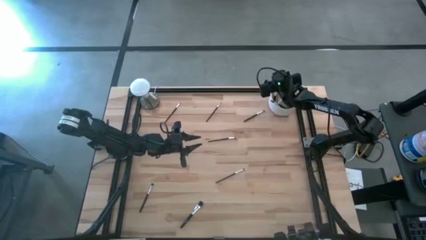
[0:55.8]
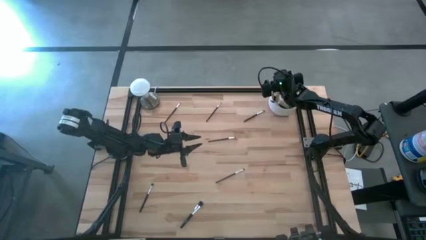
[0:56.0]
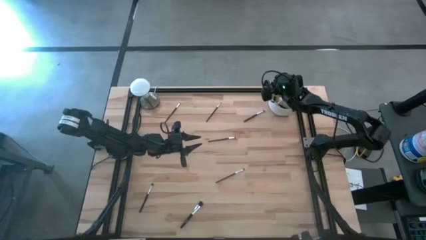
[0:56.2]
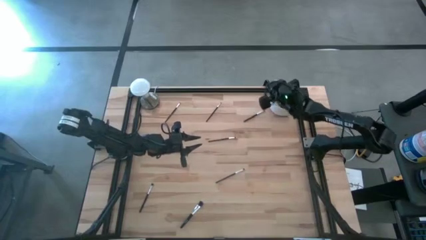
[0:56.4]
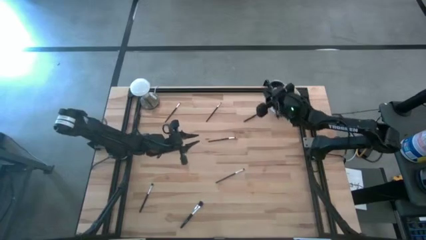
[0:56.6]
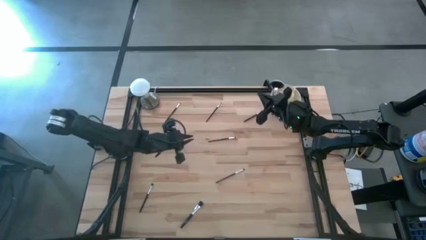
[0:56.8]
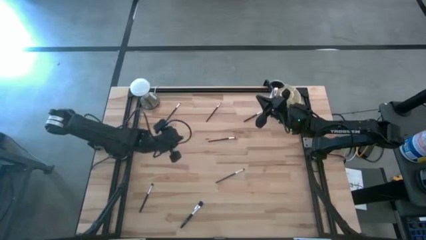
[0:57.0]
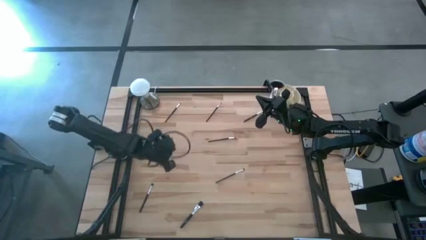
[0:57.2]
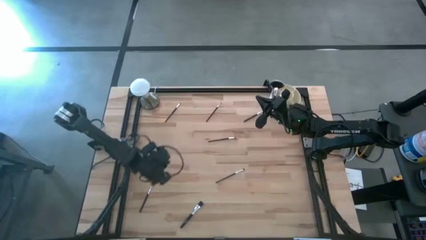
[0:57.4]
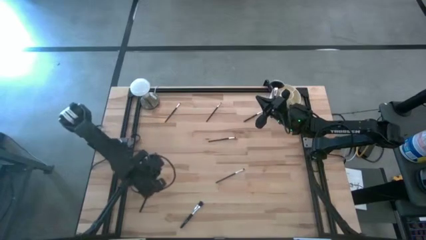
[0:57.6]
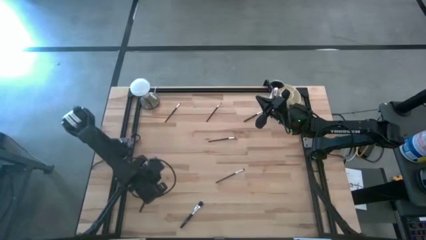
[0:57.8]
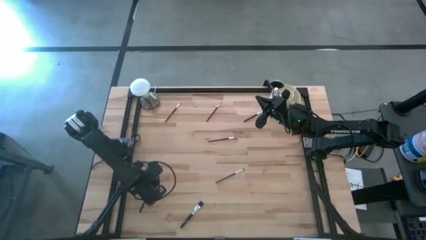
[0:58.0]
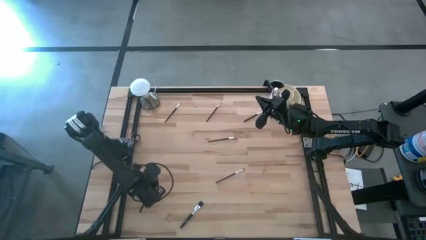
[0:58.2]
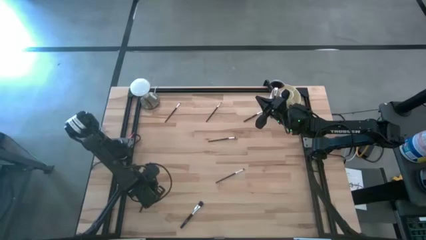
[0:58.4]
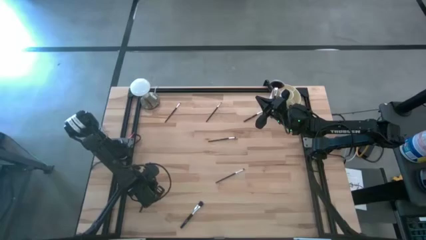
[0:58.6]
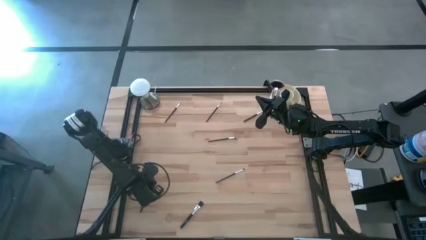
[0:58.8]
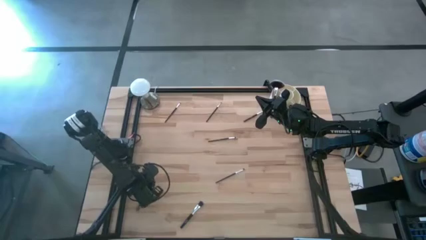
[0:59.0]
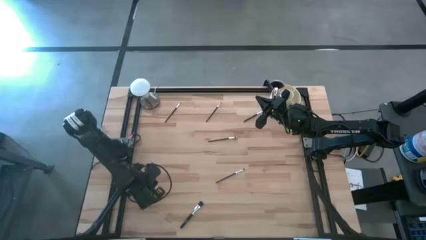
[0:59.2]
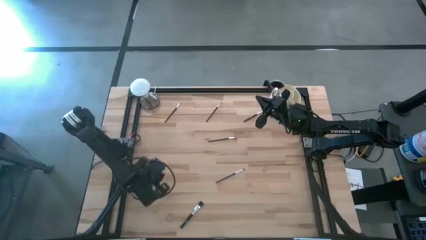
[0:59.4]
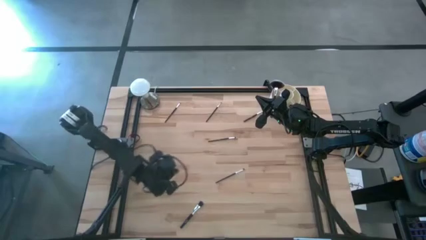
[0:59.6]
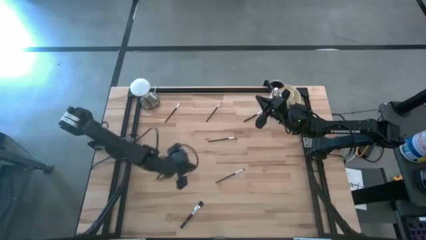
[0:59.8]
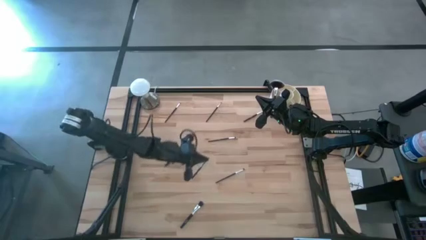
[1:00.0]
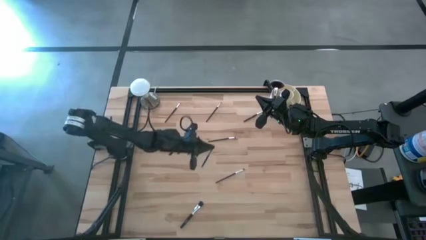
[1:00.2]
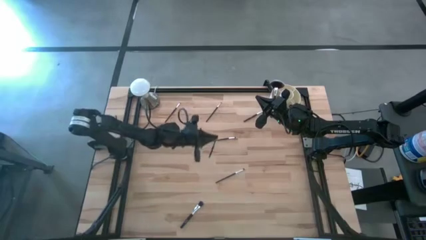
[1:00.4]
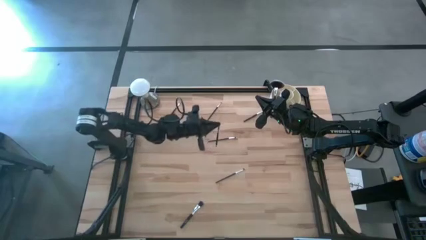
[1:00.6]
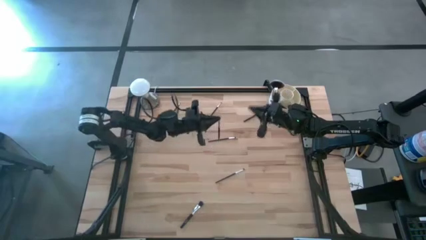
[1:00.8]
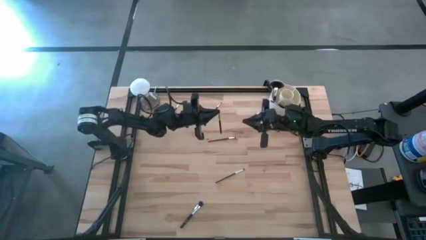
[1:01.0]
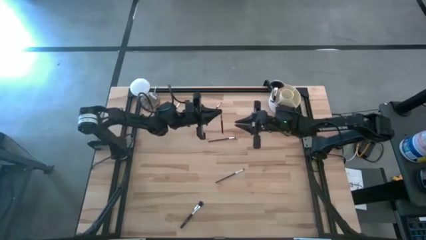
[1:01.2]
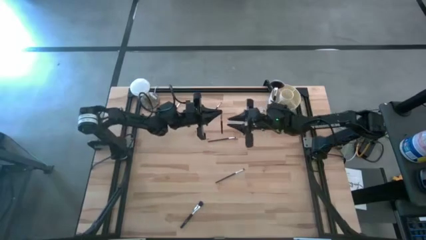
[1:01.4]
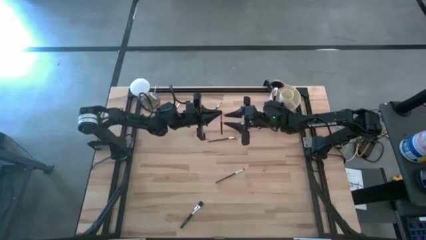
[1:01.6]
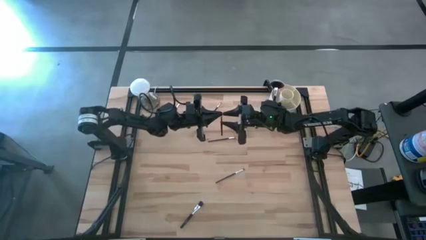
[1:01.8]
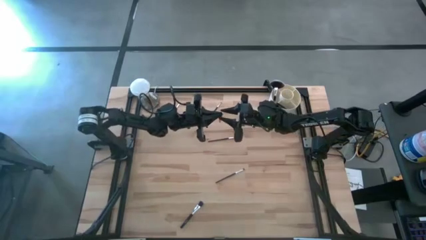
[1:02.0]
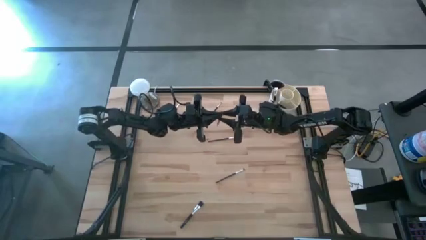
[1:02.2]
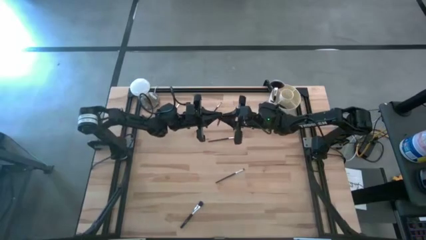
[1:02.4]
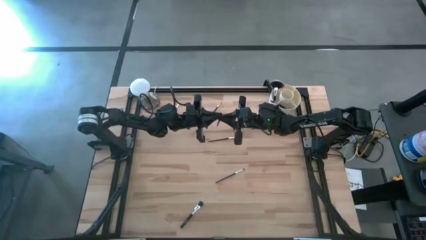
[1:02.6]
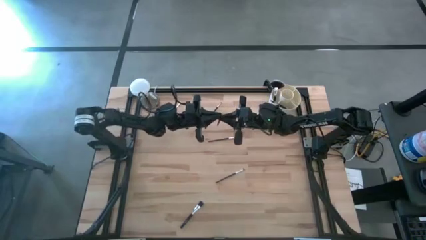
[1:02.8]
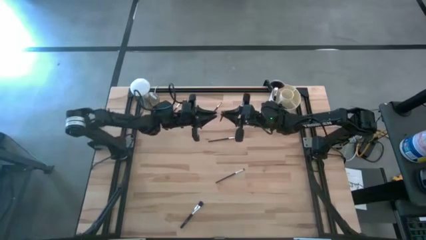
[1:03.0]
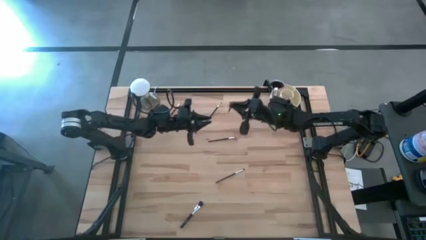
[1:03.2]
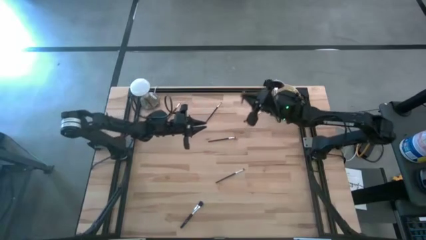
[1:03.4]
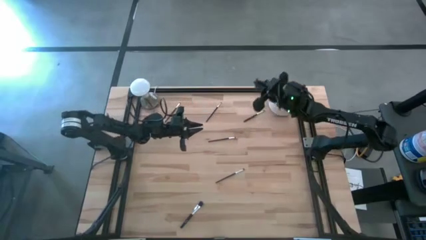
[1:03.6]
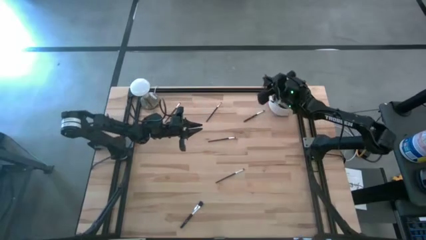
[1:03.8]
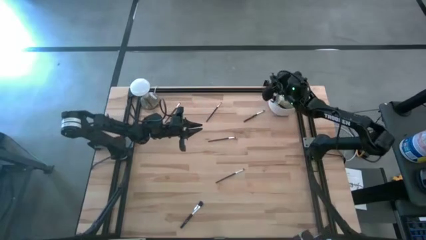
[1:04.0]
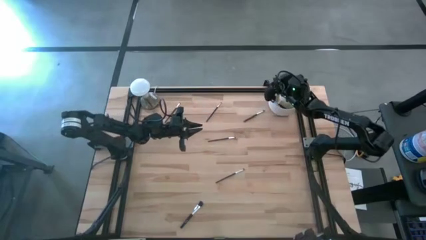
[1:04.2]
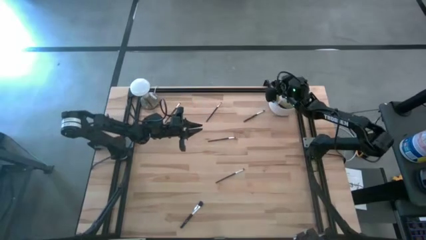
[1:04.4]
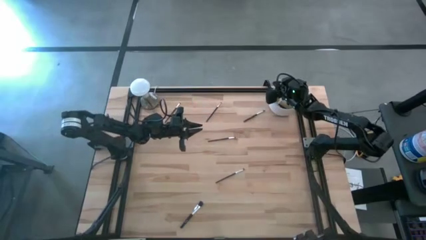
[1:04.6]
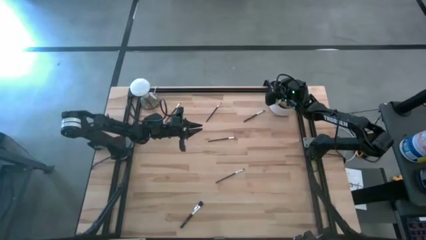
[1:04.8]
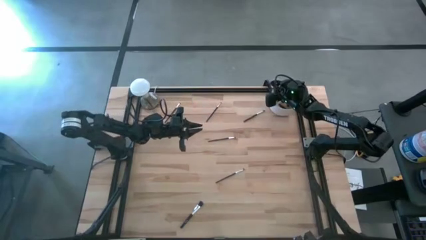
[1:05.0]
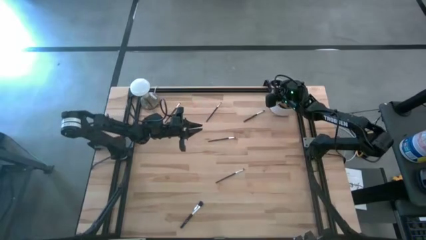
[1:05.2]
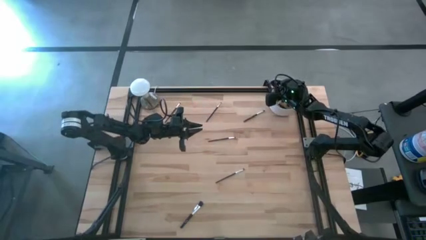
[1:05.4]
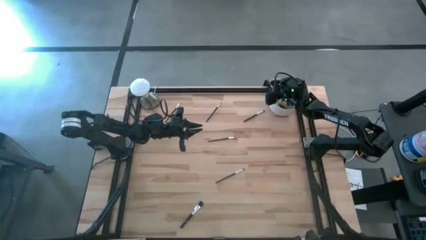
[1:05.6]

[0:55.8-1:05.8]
Task: Put items in baskets/containers
Put the black eyeshadow brush into the white organizer

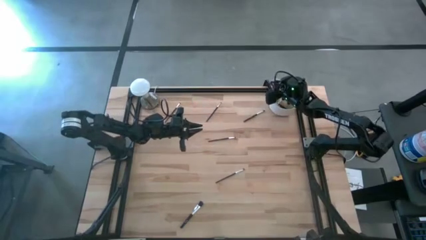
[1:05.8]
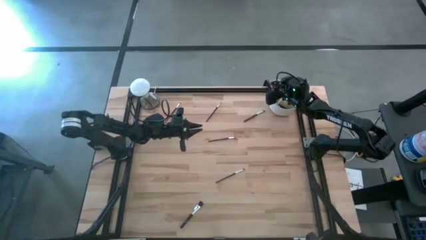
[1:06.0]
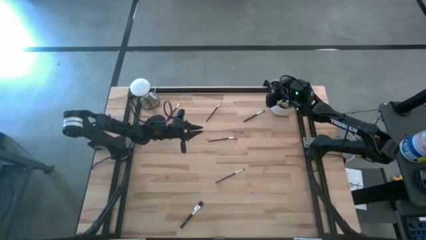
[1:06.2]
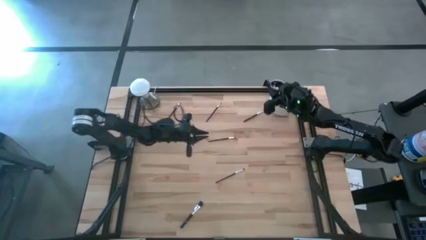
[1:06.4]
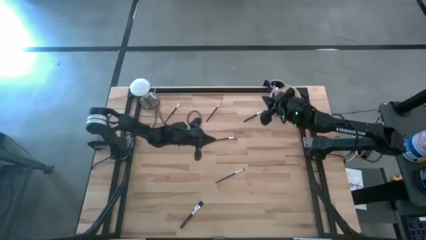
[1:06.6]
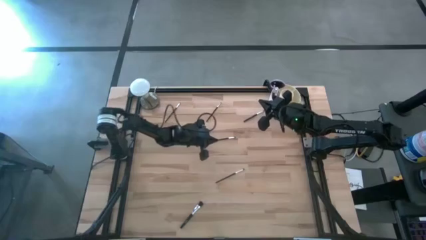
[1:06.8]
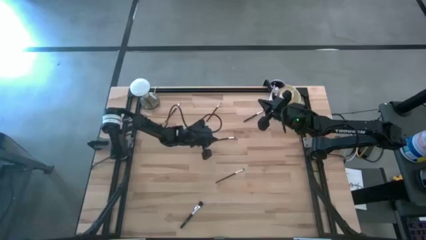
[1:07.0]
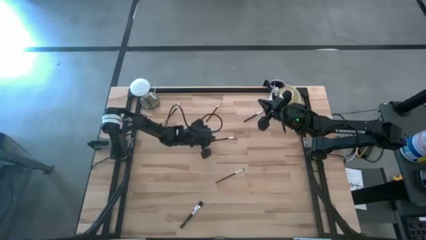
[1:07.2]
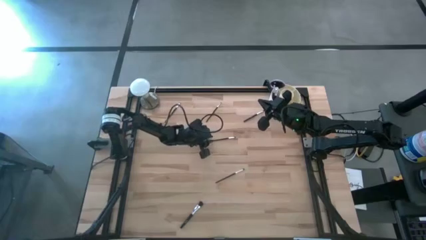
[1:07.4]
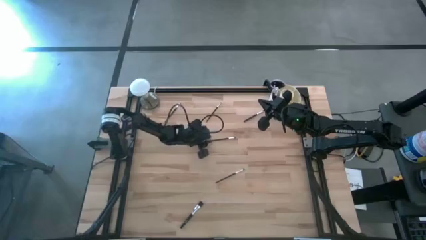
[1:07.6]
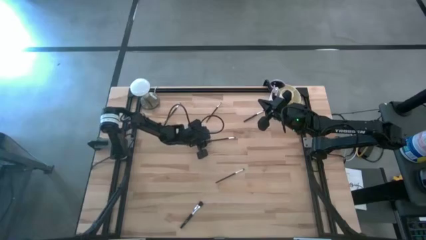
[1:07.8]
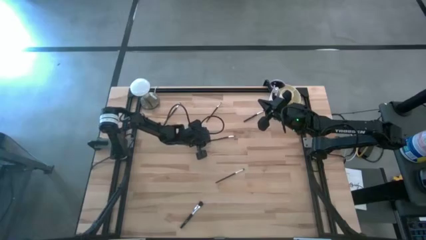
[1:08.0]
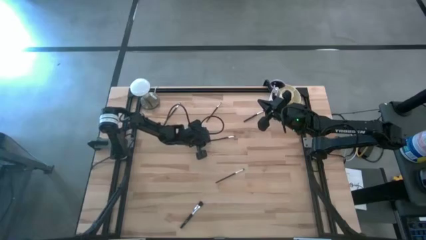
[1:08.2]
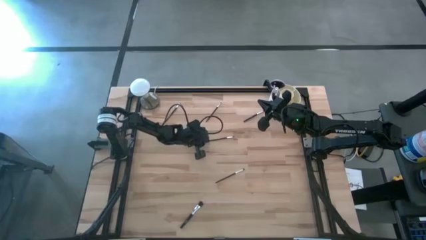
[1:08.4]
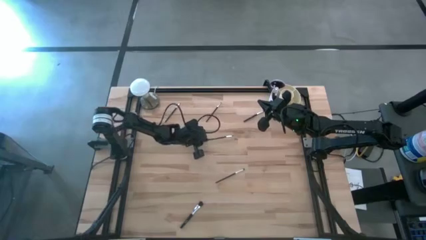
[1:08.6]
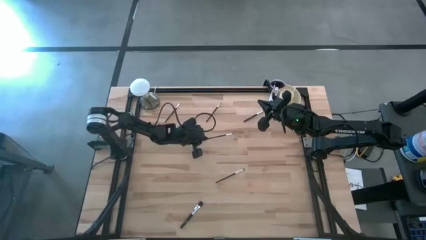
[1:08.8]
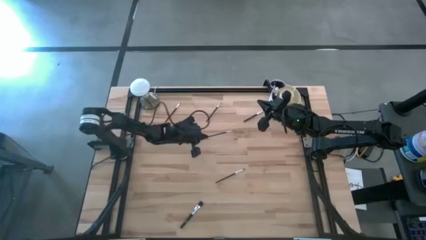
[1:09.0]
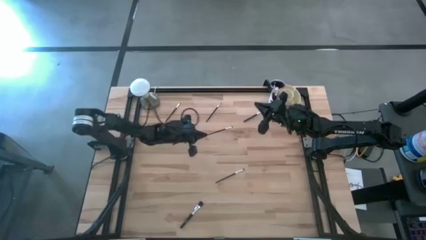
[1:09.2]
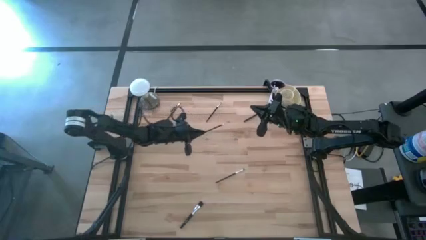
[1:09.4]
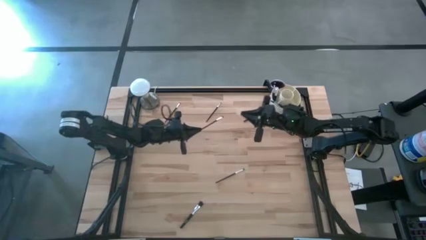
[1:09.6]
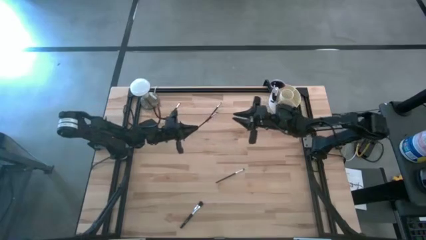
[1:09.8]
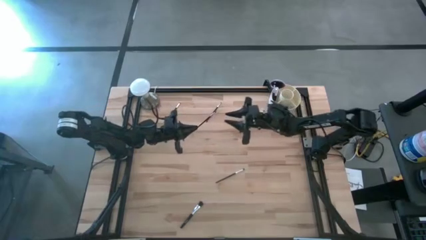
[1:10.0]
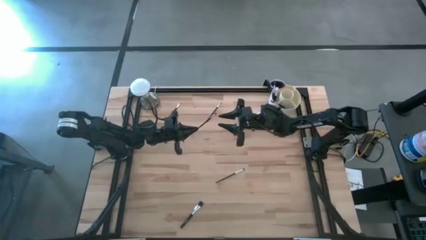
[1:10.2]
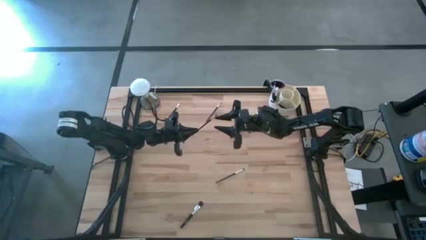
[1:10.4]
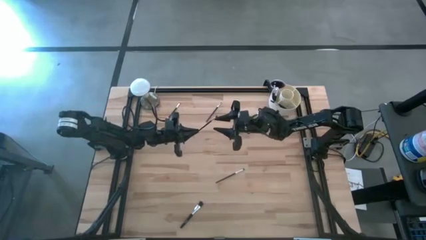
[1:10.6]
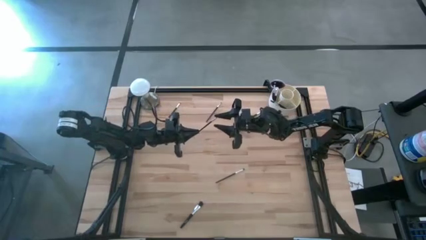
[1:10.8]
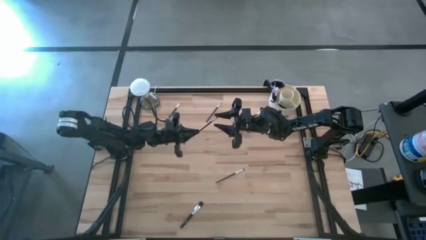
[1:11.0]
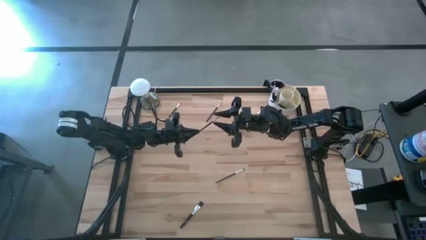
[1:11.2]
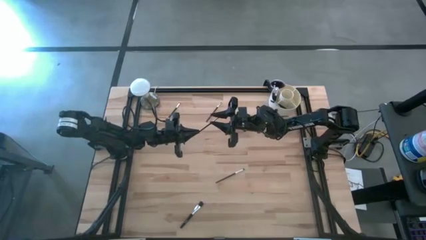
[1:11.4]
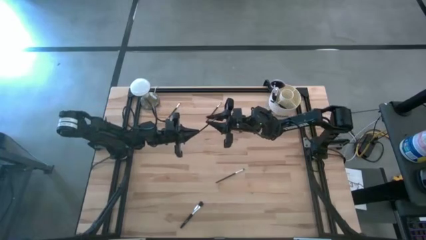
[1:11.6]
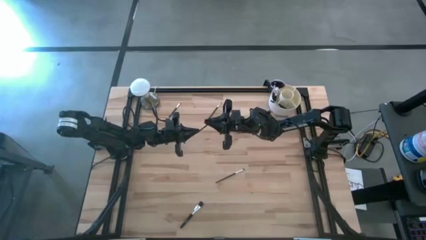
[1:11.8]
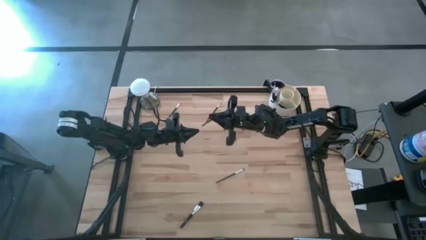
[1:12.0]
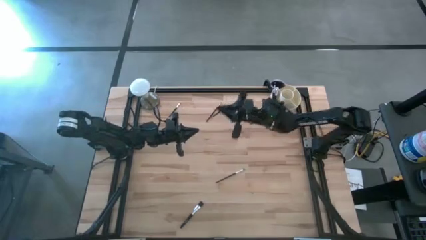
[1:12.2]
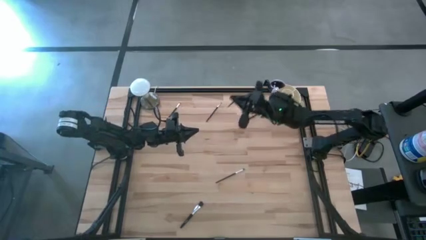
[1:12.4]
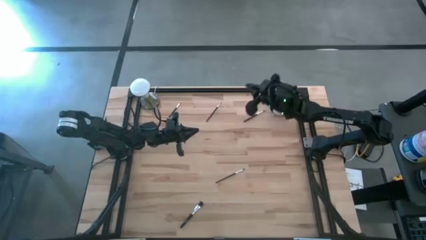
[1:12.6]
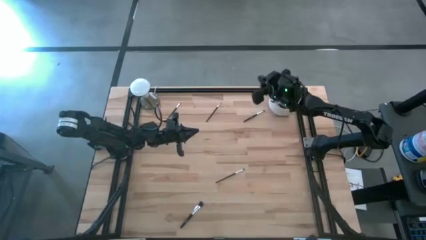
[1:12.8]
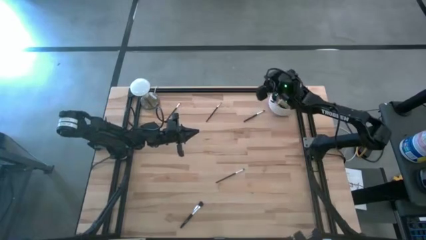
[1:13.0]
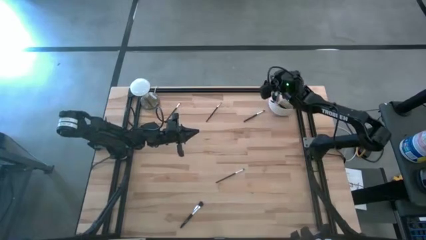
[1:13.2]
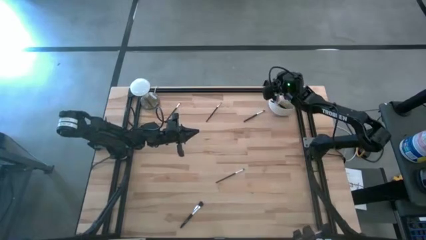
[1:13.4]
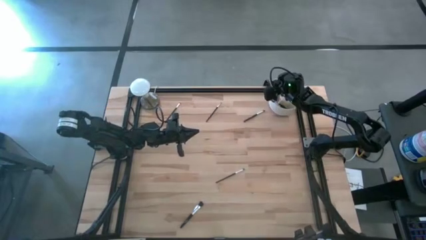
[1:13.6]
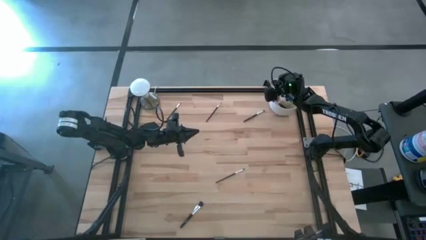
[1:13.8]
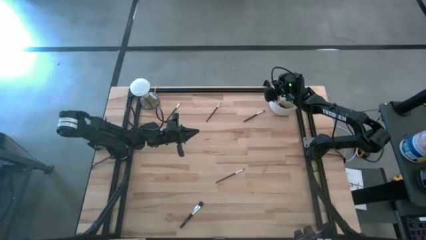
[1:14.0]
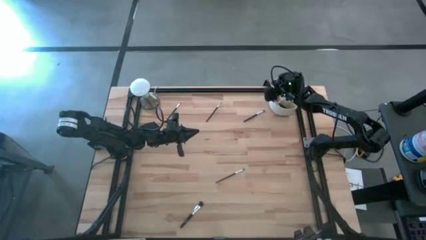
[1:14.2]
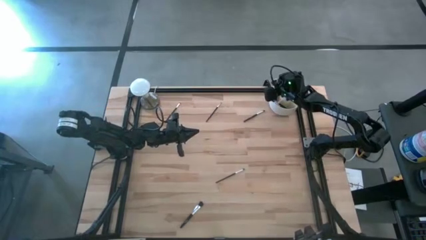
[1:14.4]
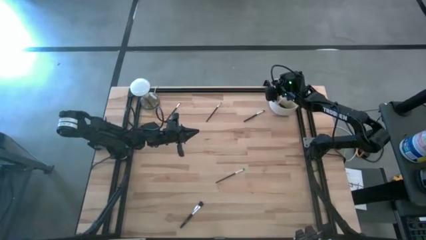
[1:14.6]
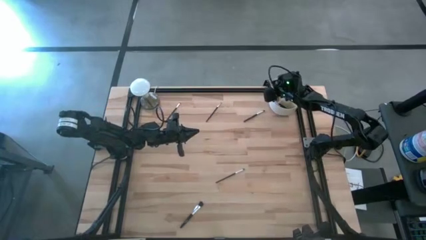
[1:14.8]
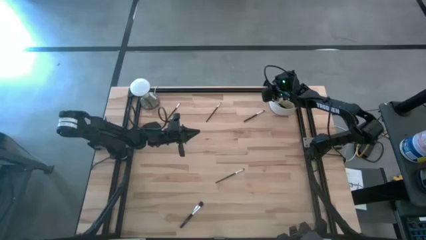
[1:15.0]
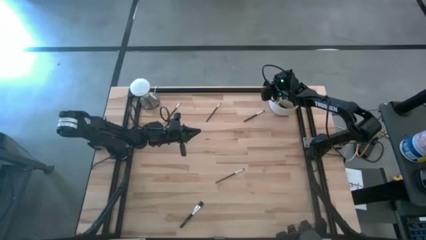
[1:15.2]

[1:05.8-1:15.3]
Put the black eyeshadow brush into the white organizer
